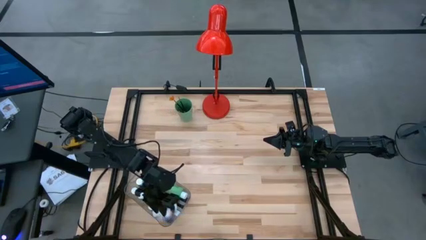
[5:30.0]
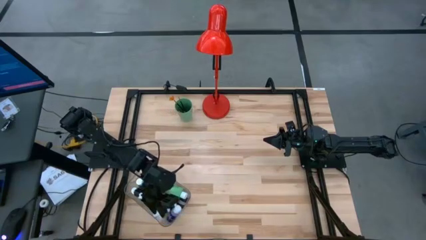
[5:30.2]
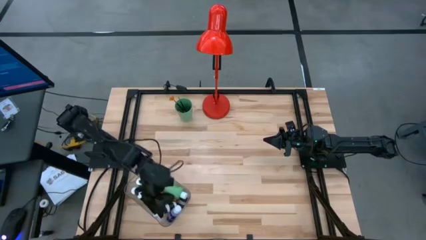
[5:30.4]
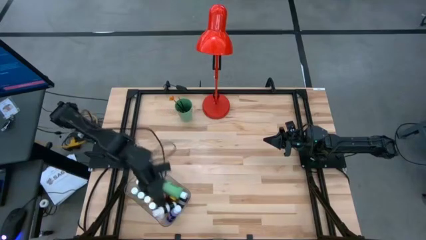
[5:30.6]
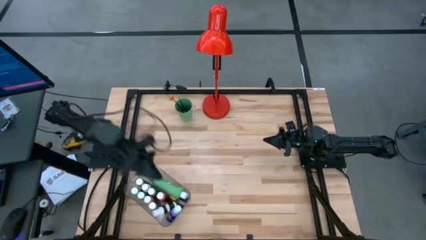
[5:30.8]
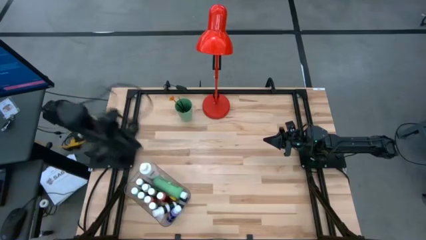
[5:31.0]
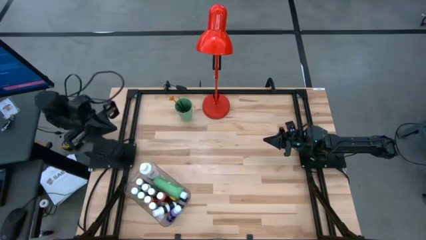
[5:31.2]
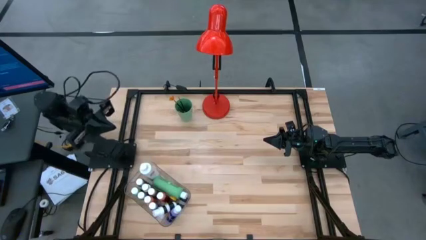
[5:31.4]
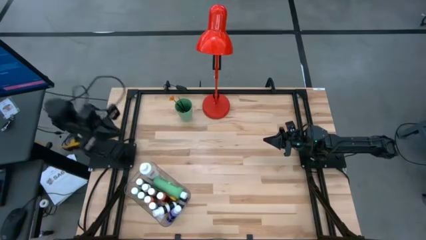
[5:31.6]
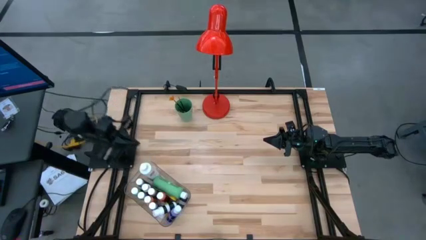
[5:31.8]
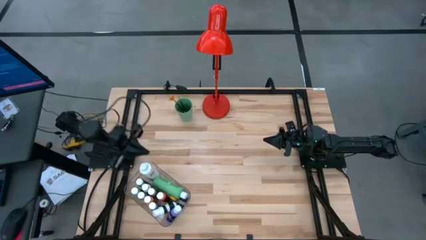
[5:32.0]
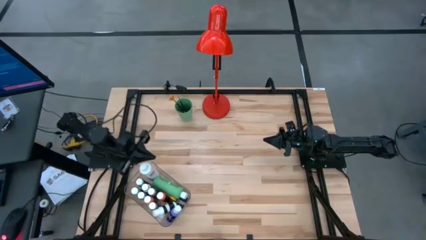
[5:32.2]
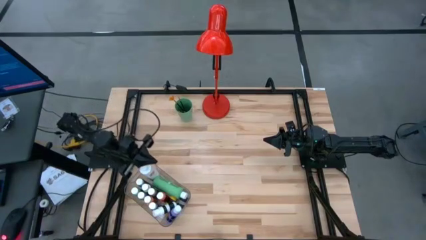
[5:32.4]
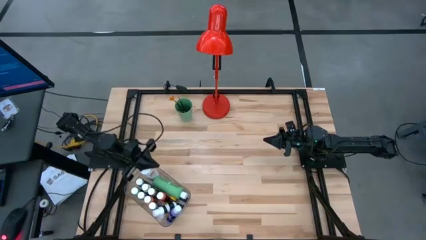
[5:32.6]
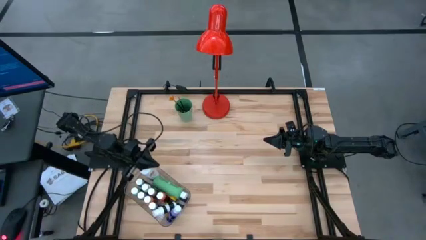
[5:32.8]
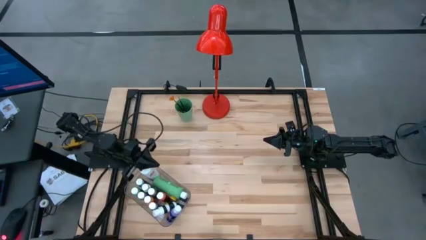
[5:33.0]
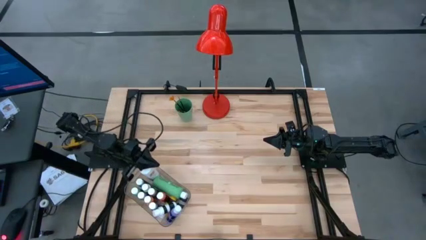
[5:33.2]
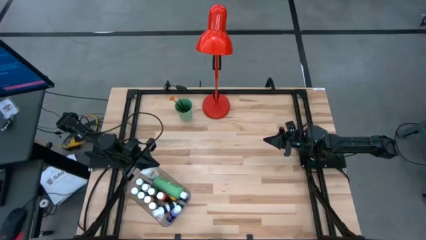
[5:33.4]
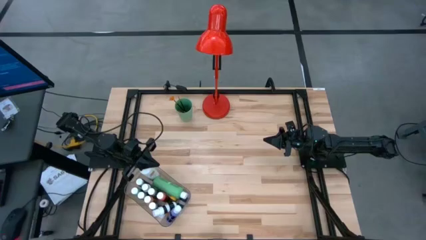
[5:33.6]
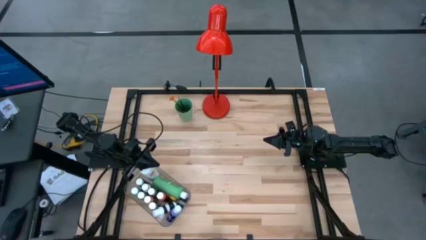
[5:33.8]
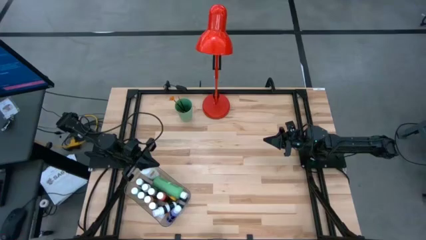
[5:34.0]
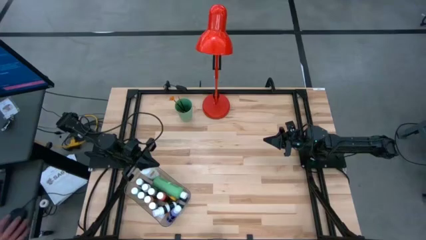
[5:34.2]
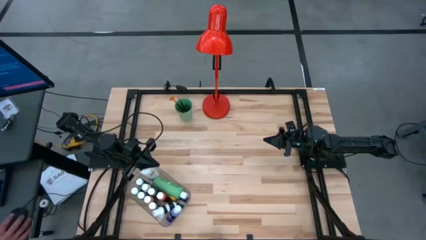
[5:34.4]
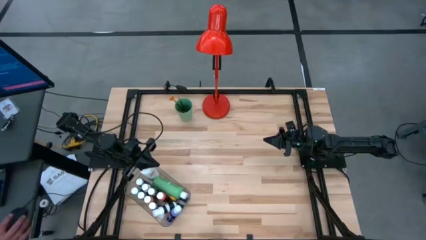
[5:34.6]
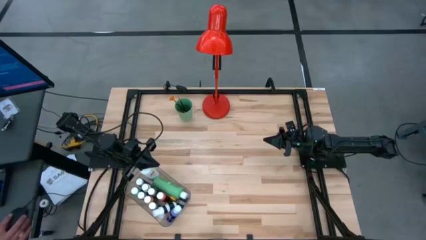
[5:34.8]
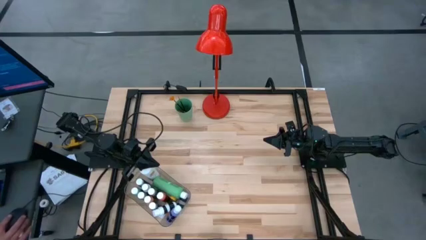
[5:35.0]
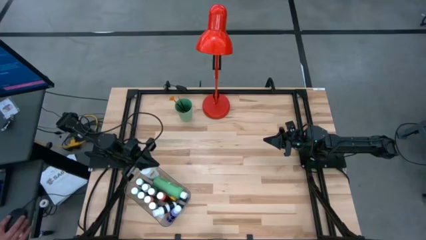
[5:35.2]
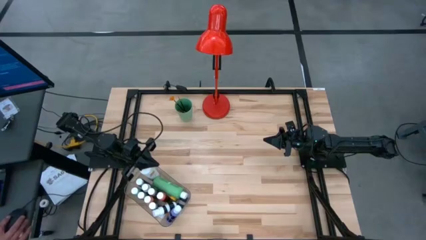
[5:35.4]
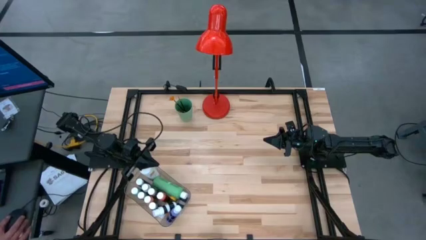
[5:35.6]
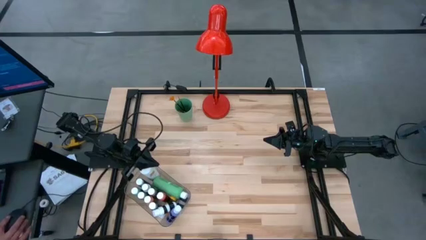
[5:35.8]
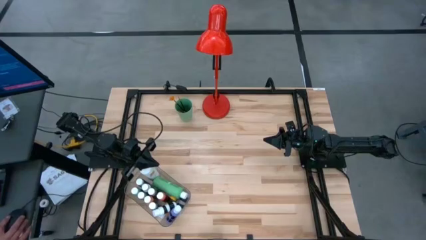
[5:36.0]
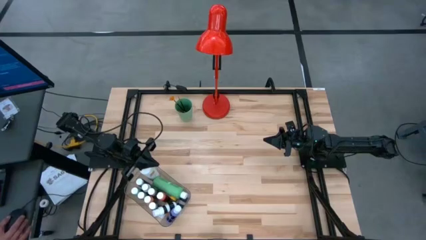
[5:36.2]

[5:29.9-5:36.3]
Task: Pick & Place Paint Supplies
Return to Home Position

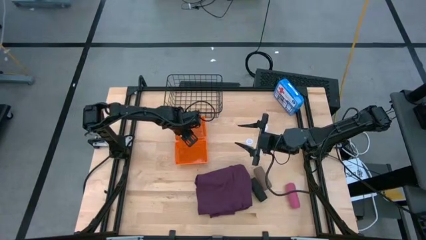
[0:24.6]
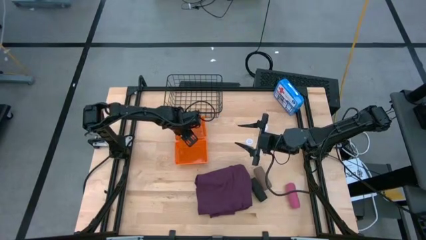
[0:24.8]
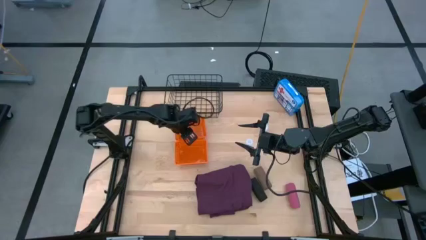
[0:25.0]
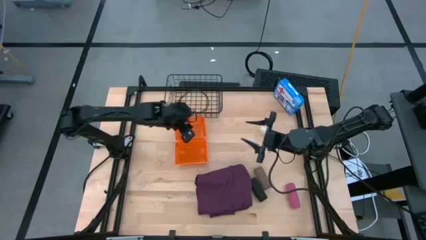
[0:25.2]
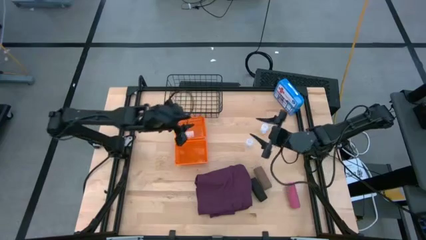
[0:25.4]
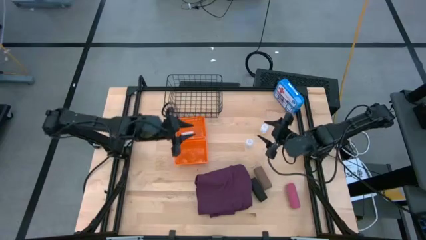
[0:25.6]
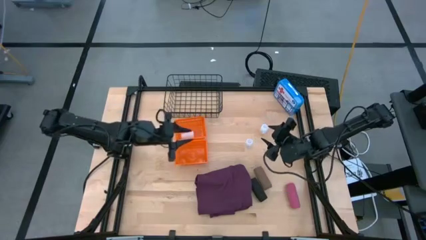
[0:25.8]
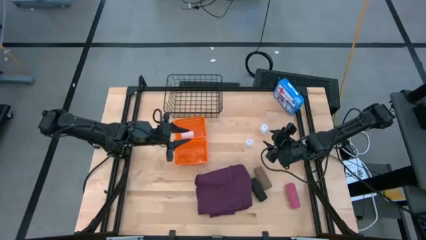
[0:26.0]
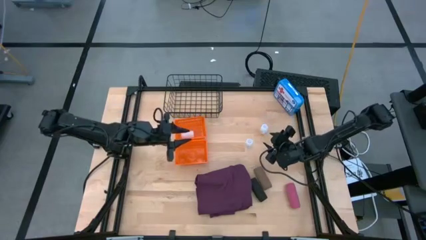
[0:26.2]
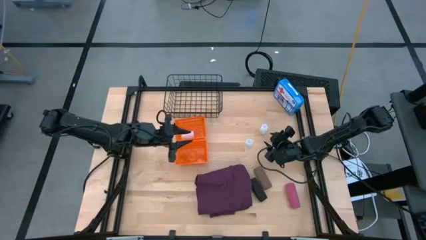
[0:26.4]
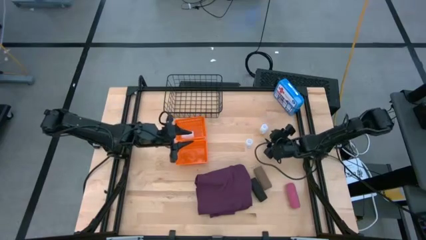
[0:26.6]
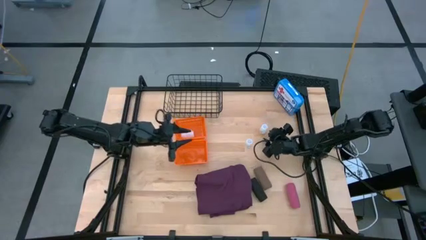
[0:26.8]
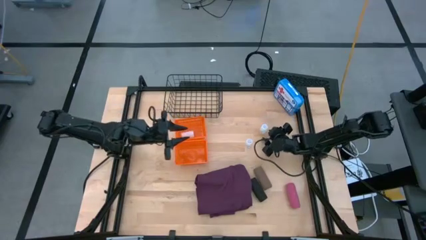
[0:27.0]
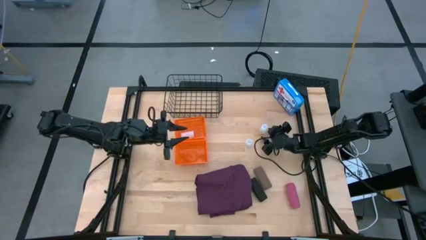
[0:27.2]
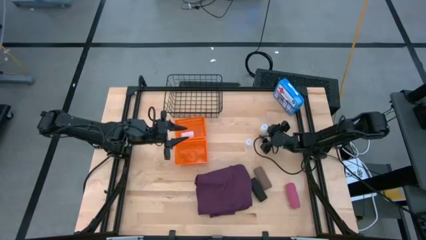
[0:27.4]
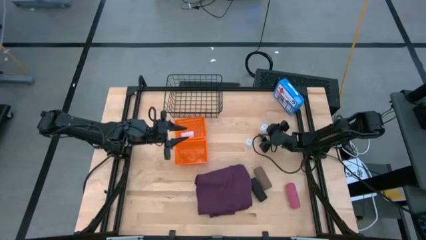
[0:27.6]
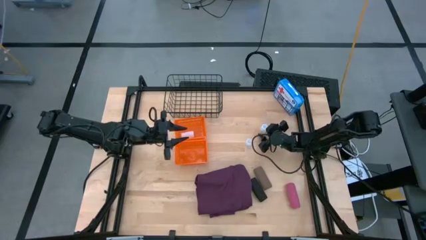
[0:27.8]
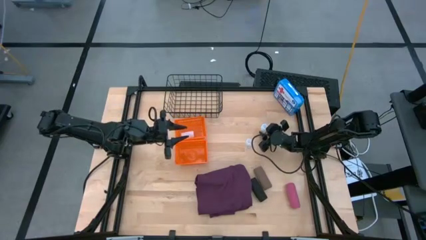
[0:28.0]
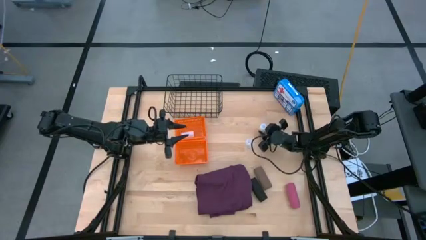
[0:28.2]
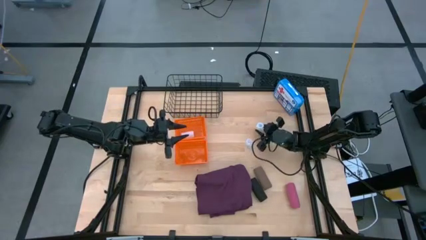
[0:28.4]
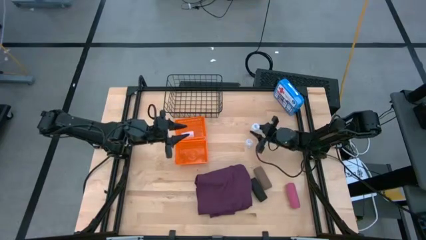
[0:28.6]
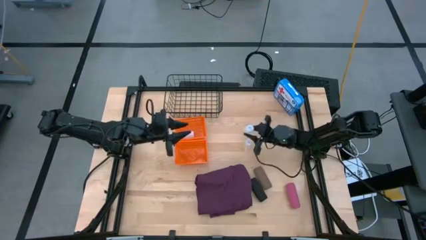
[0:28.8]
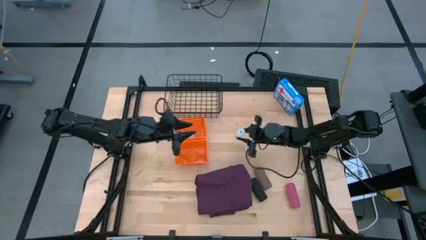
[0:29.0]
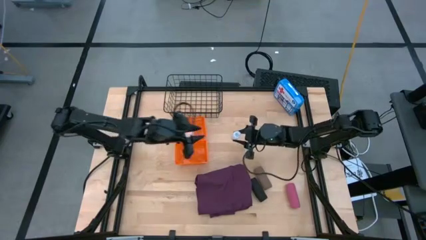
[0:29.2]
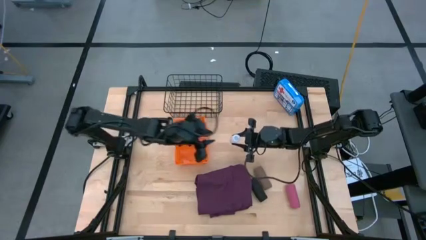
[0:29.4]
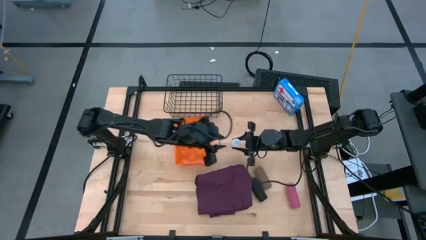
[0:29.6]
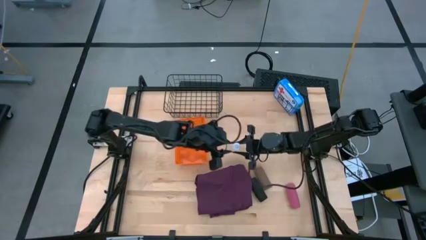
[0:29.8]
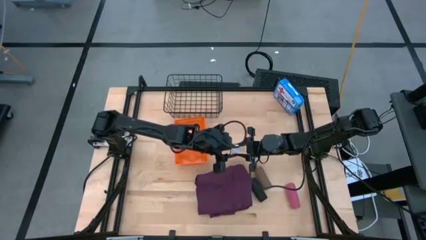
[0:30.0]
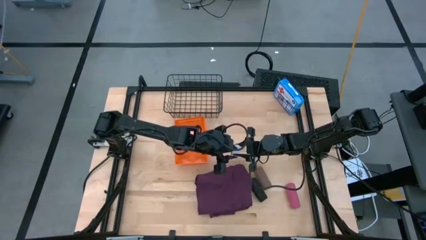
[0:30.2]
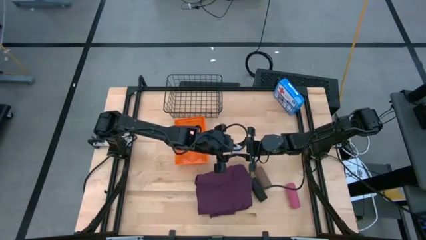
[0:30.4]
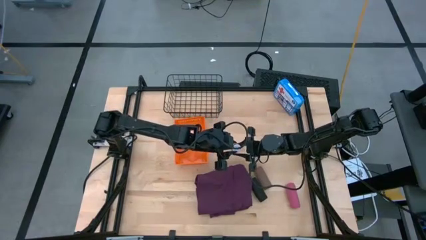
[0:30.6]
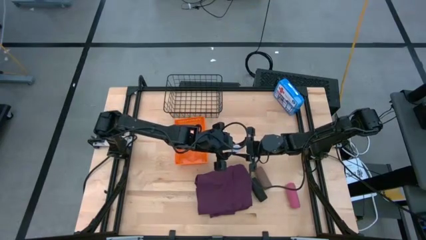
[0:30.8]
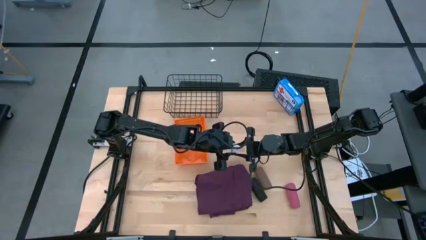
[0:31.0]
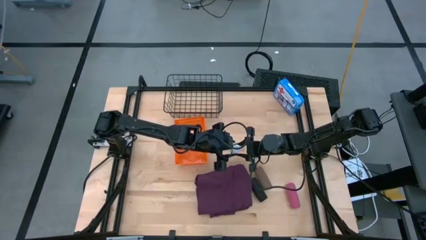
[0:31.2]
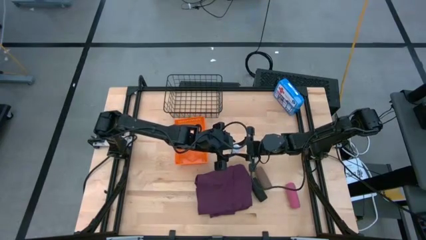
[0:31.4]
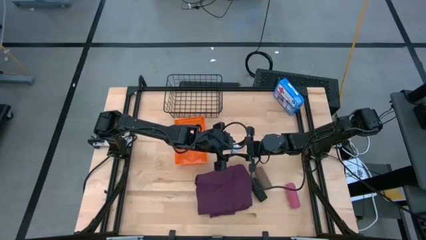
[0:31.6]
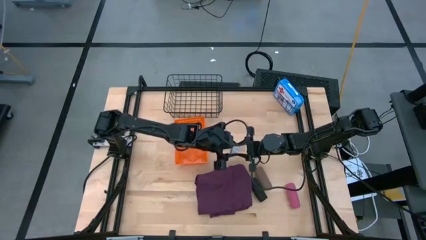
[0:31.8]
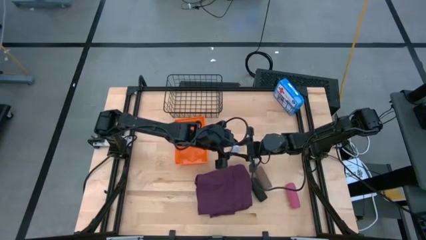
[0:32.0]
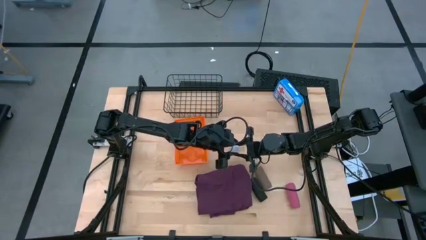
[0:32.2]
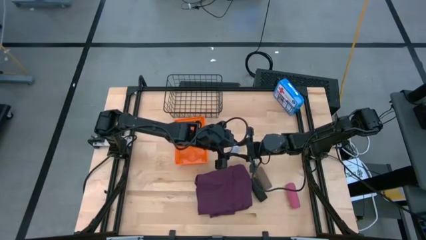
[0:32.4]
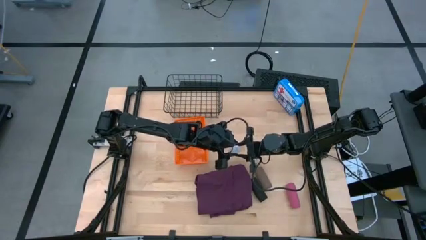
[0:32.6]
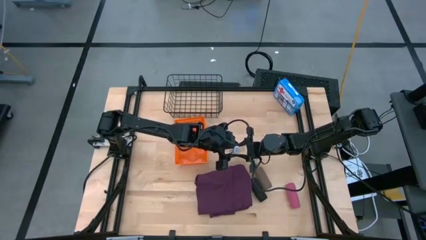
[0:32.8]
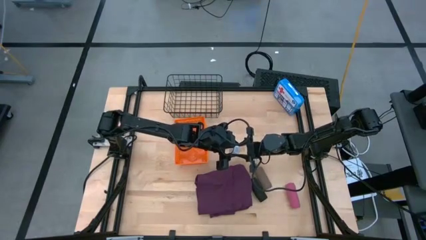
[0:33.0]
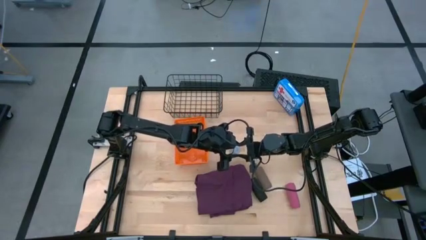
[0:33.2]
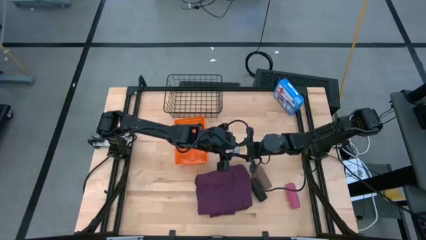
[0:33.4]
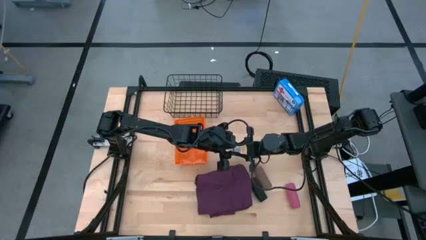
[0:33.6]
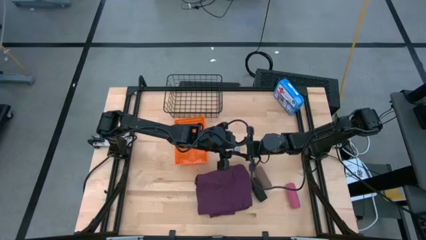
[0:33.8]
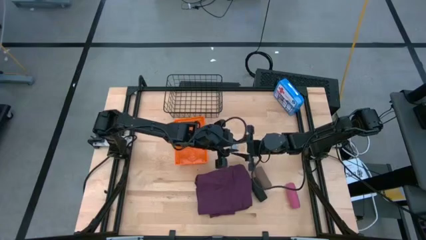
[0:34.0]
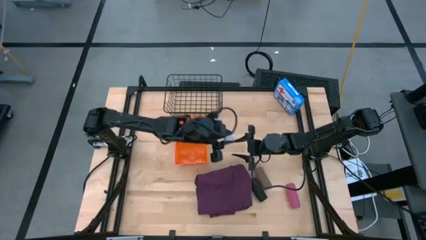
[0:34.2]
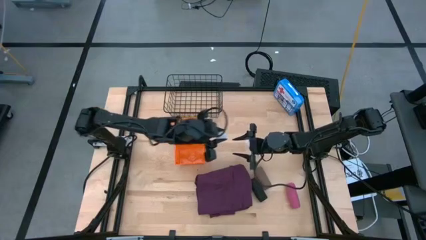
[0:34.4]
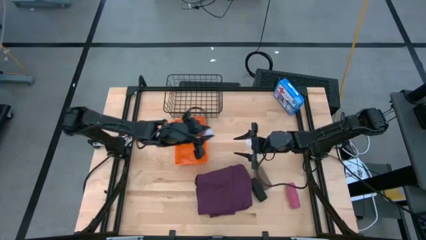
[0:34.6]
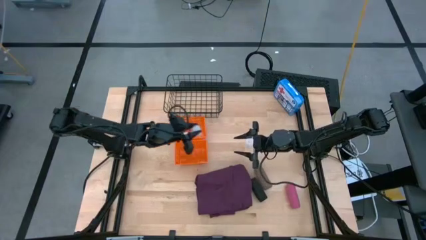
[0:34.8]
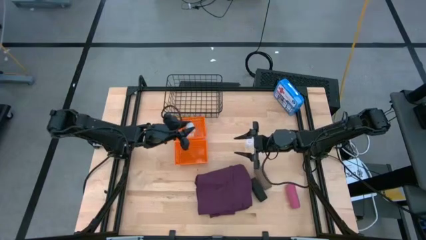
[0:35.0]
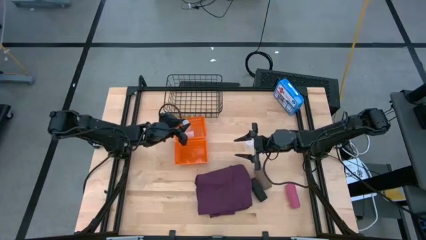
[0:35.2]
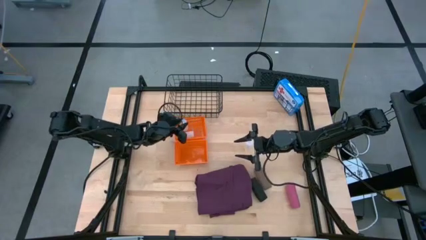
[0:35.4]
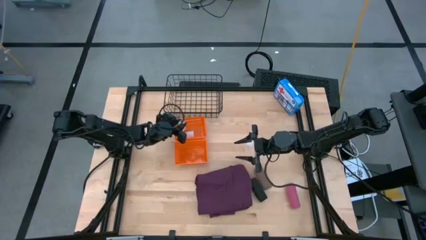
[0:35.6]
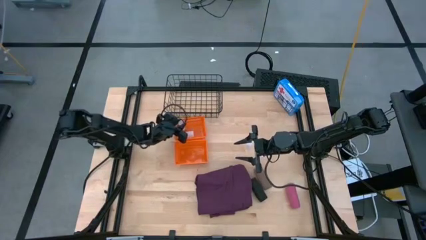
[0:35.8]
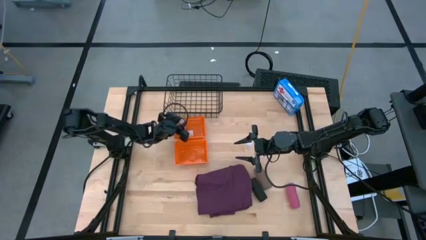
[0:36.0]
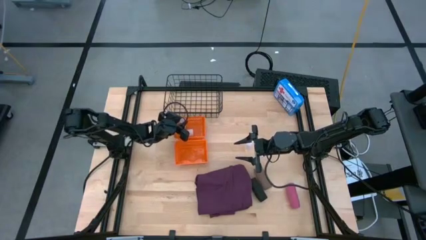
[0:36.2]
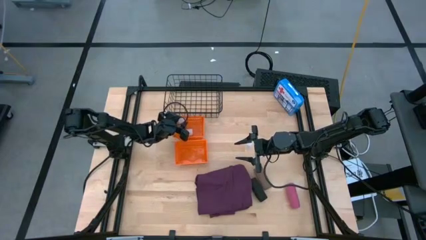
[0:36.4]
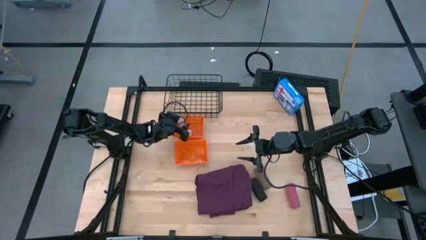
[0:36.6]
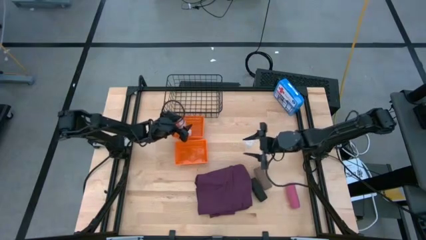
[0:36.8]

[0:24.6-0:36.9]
Task: Pick & place medical supplies in basket/bin
Put the top white pill bottle into the top orange bin
